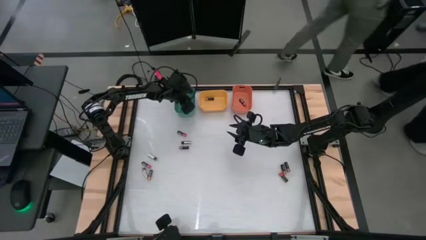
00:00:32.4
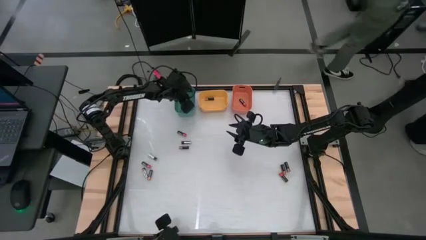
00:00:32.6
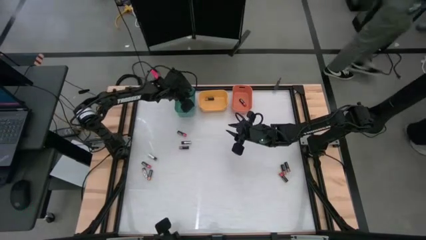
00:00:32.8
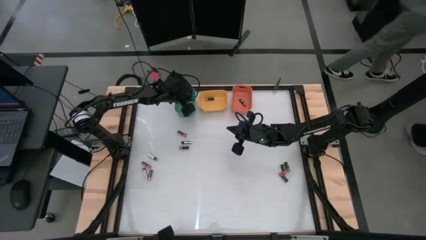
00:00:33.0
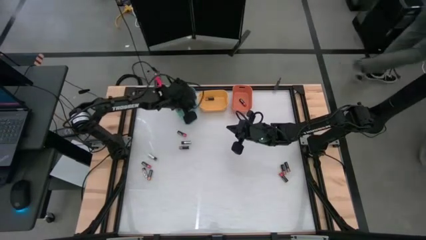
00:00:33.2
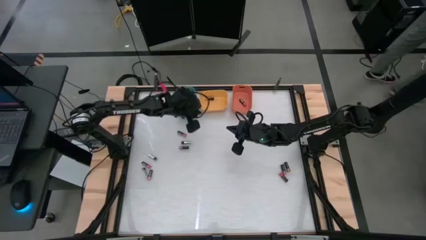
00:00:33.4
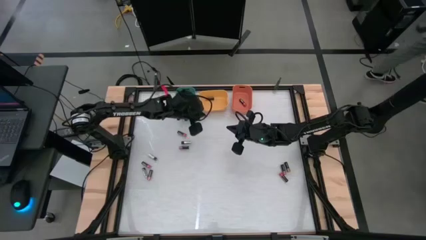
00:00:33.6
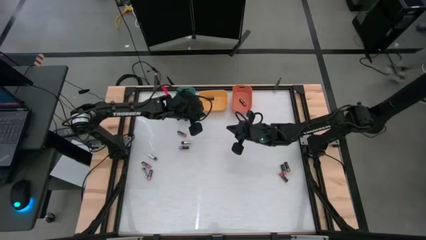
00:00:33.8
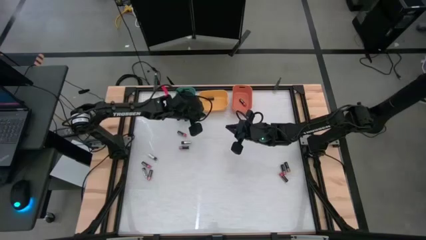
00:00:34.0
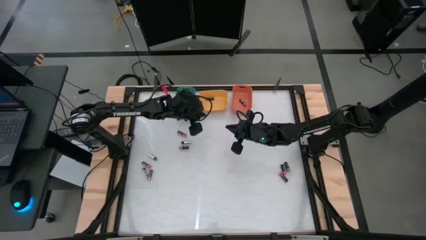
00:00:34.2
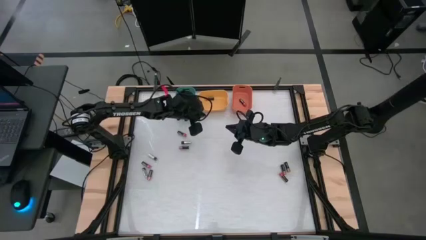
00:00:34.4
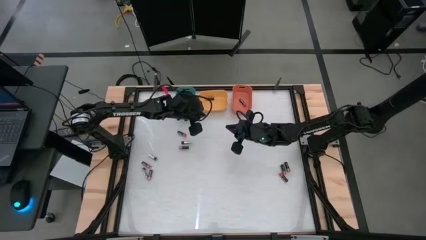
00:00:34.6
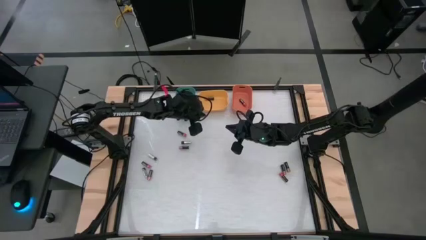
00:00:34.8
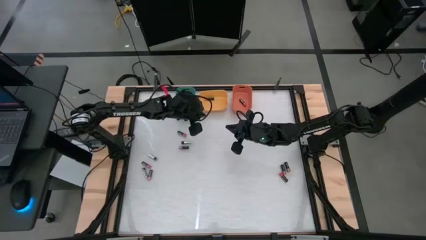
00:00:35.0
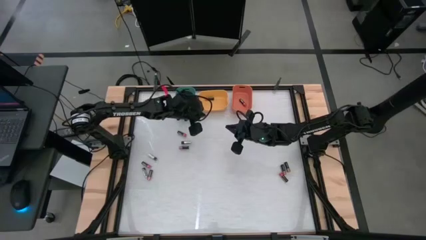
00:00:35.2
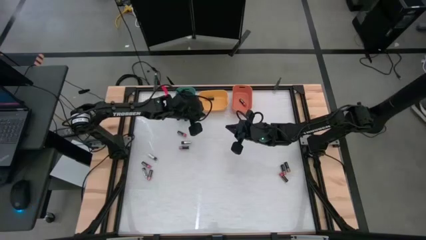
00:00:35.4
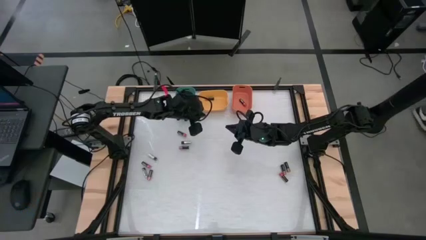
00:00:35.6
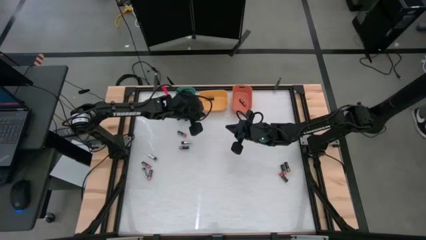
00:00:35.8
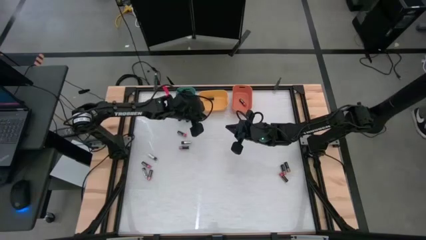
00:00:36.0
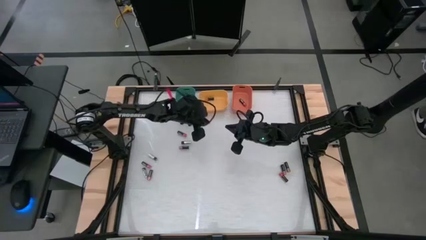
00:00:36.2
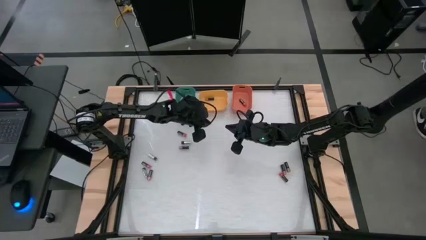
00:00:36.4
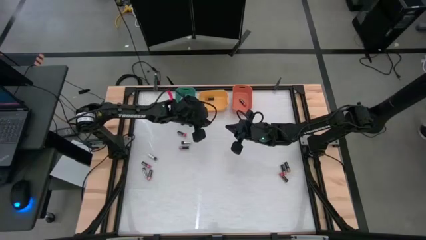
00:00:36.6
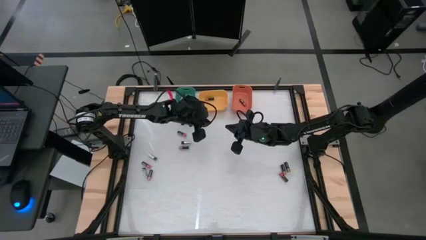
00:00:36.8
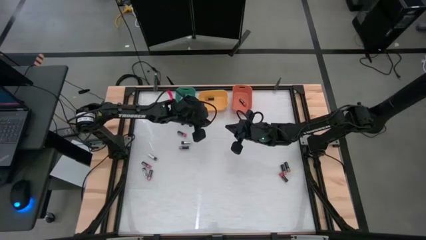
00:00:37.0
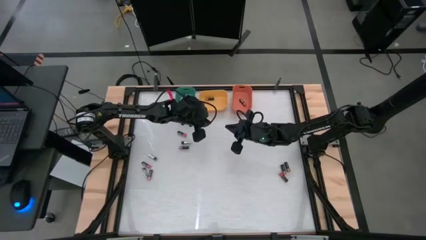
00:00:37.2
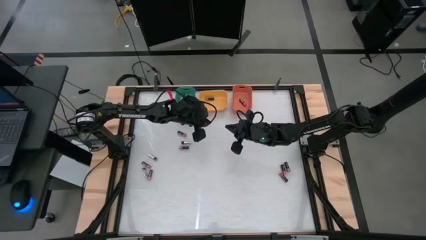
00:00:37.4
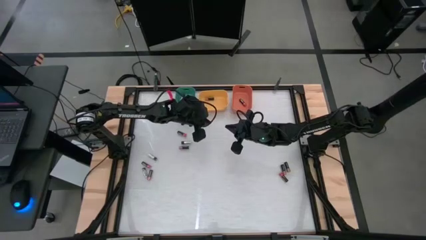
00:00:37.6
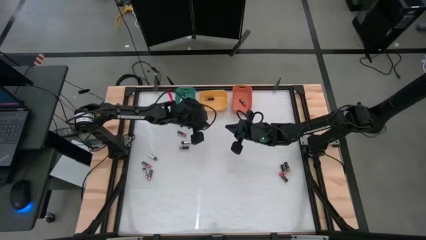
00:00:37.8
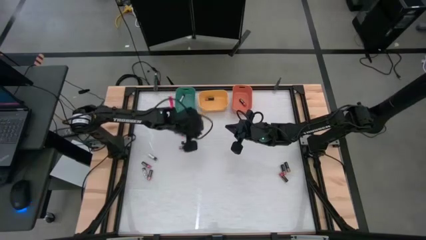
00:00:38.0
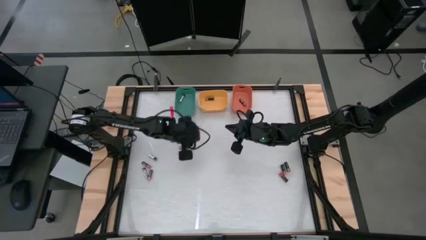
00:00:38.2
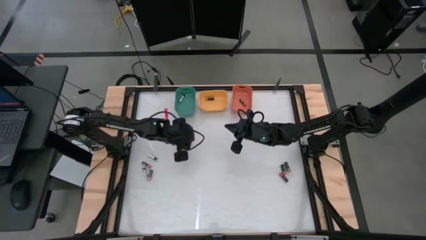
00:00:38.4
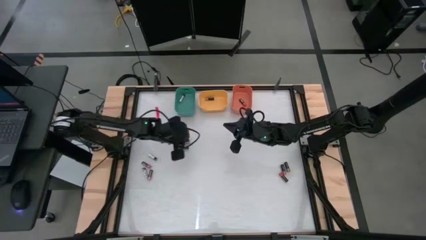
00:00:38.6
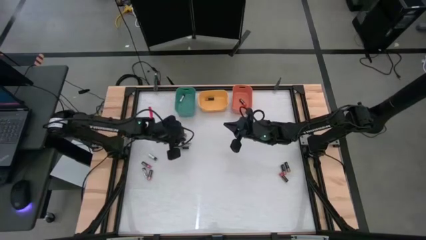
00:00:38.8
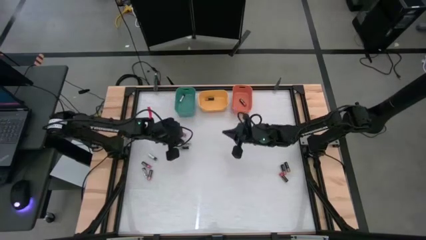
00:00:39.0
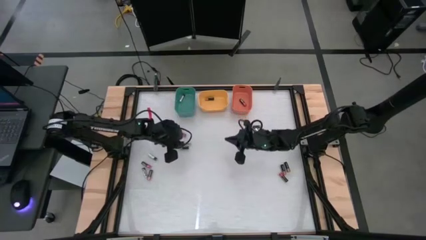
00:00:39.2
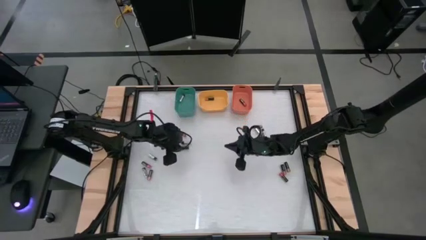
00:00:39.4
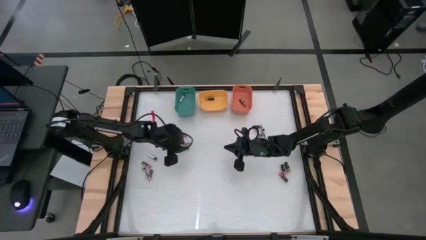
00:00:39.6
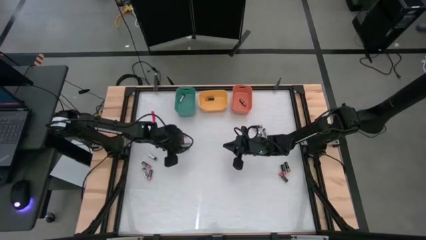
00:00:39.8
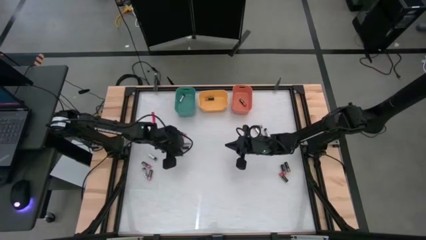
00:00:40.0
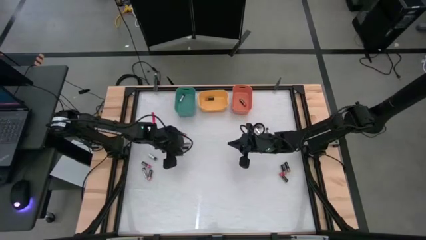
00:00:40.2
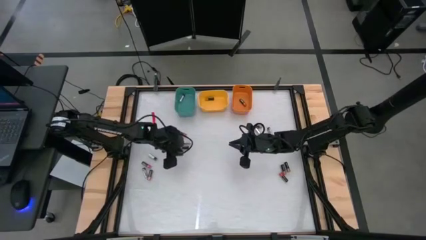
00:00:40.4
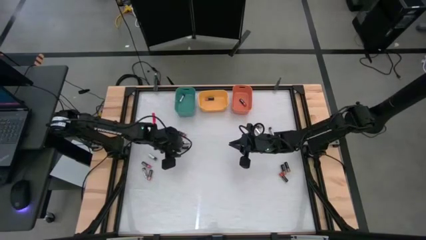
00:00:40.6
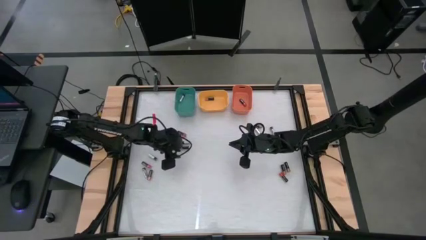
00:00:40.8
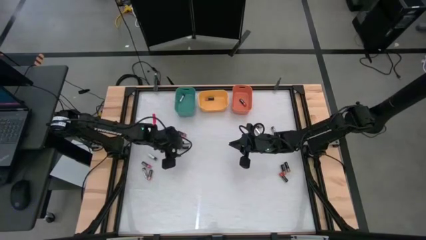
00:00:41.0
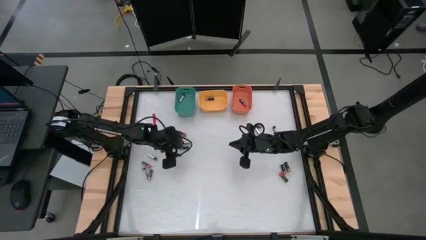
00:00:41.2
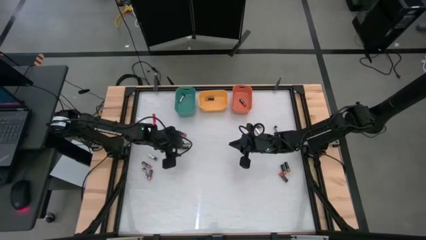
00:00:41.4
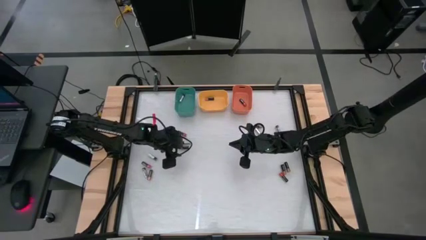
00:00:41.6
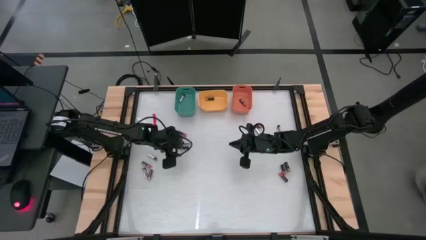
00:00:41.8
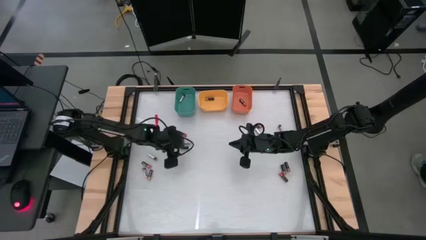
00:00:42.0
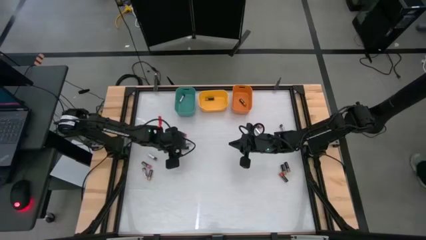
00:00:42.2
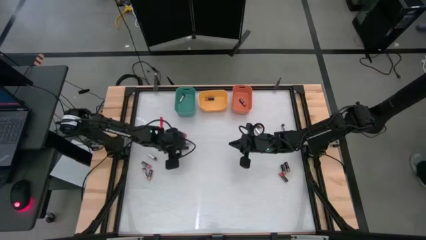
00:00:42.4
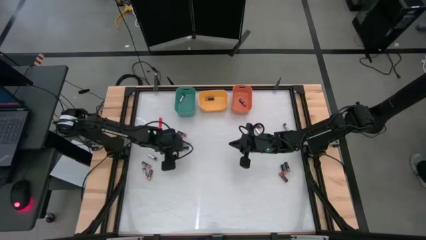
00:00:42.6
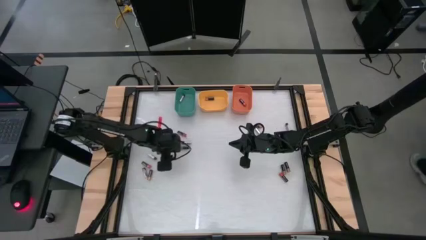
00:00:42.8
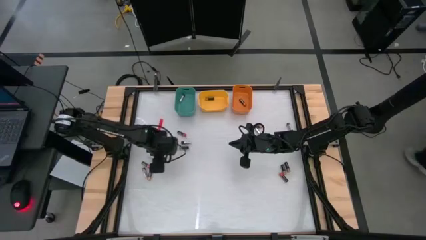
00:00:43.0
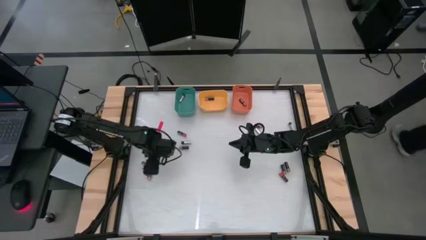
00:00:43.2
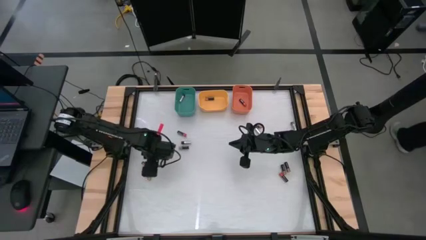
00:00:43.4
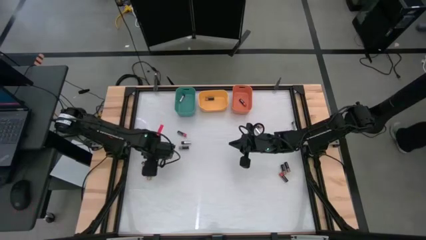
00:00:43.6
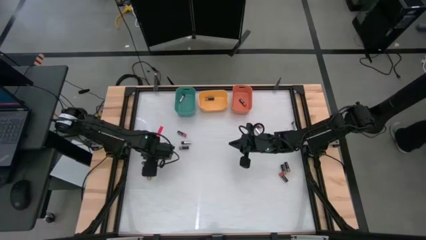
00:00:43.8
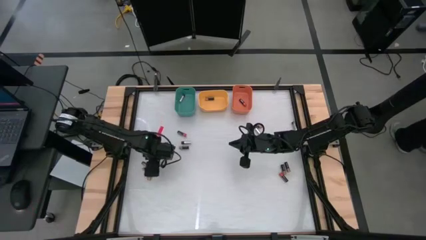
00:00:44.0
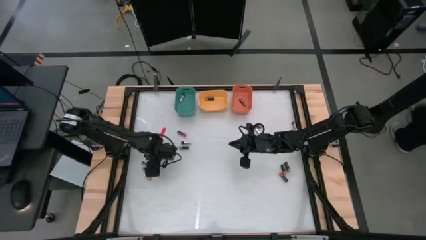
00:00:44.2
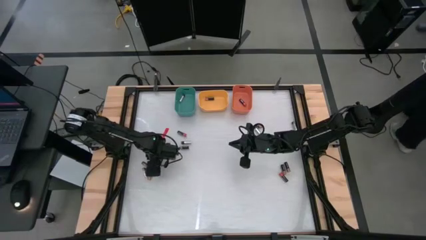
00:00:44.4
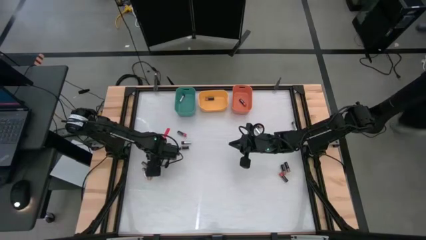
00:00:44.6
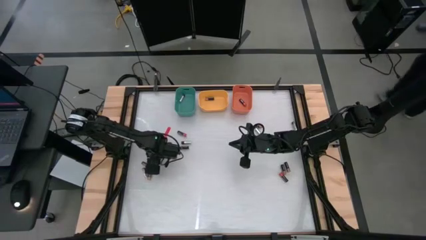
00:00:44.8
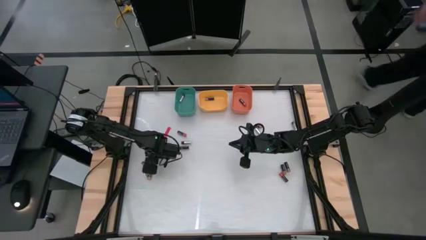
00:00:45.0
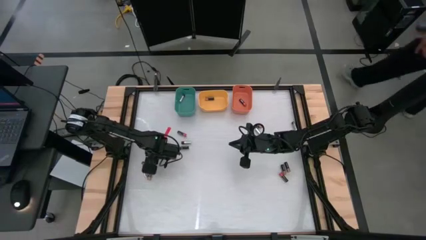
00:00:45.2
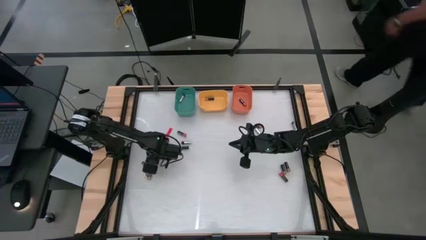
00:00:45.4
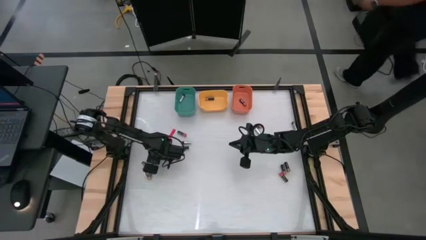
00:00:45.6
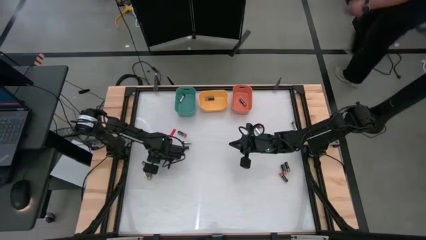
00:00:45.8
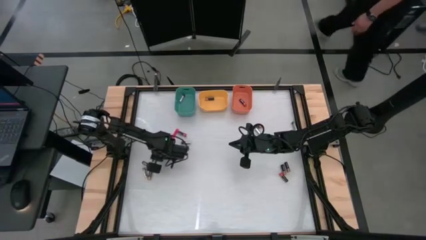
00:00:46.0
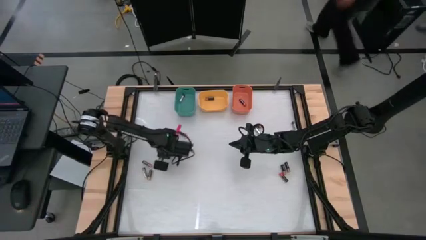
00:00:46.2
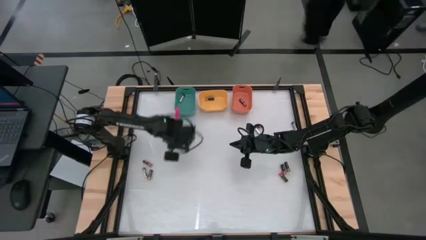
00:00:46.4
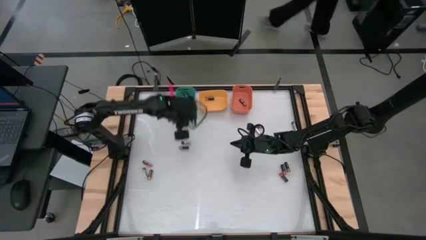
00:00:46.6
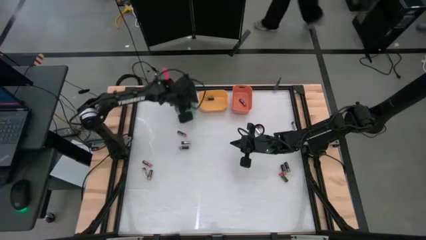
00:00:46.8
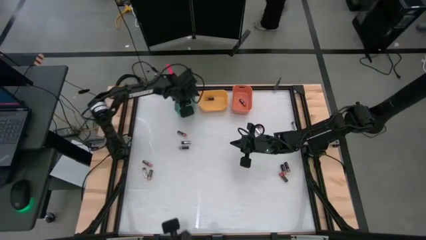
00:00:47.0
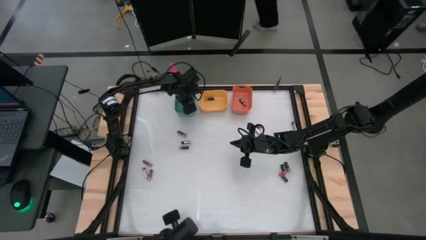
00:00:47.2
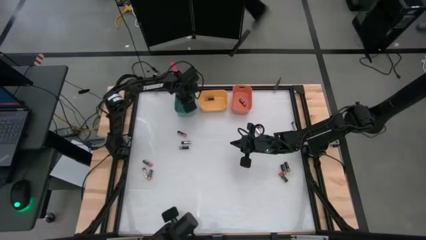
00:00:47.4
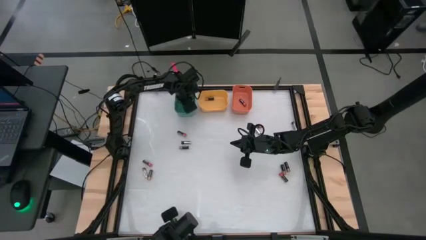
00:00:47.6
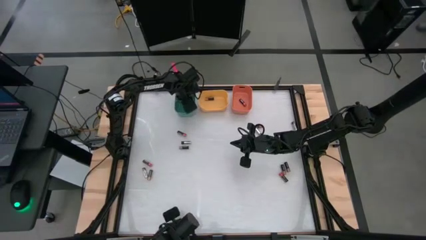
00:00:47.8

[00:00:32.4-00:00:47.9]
Task: Sort batteries
Put the silver battery into the green bin
